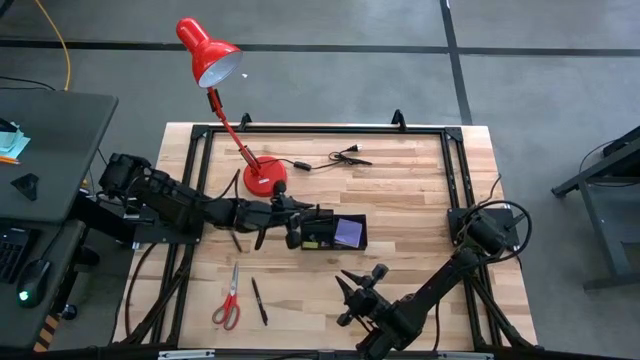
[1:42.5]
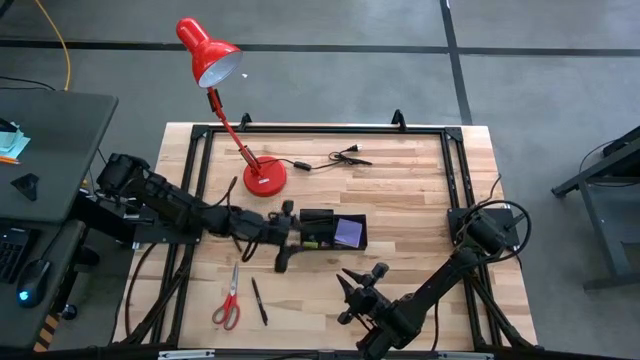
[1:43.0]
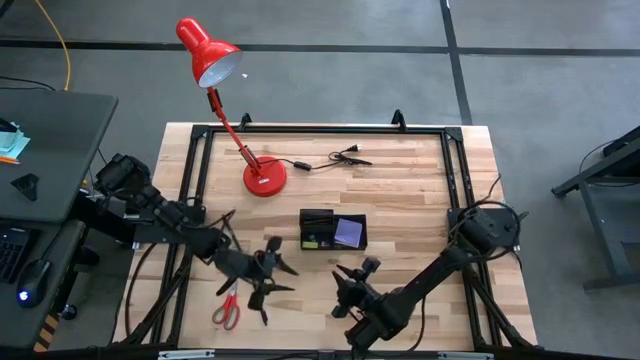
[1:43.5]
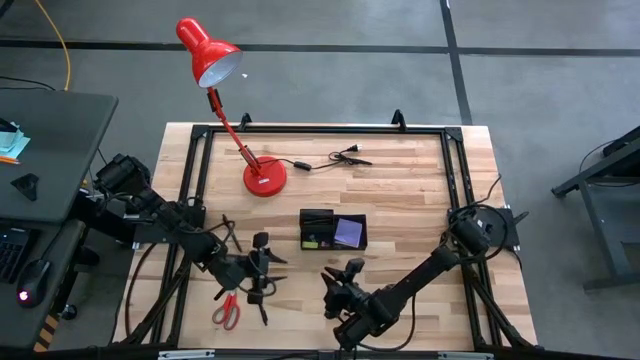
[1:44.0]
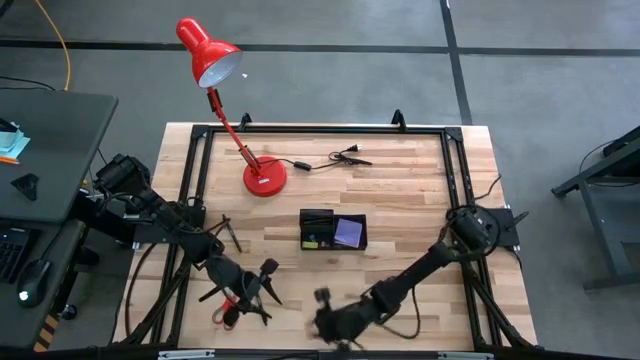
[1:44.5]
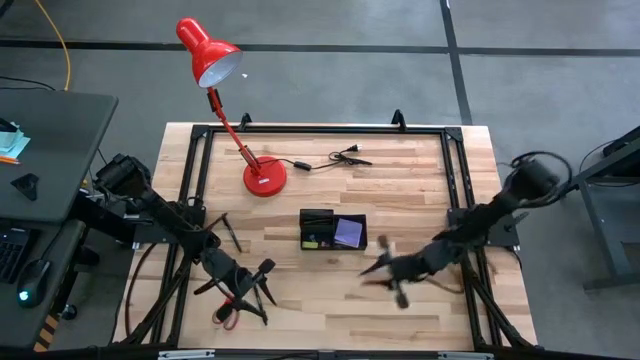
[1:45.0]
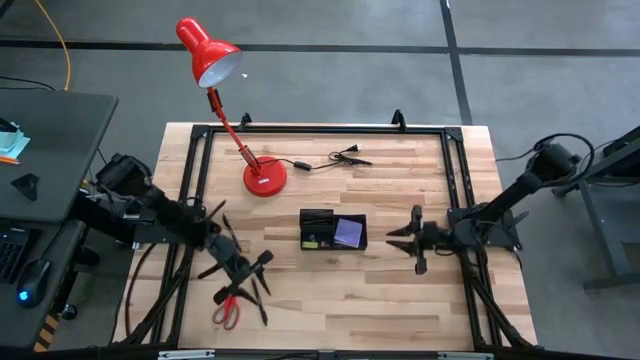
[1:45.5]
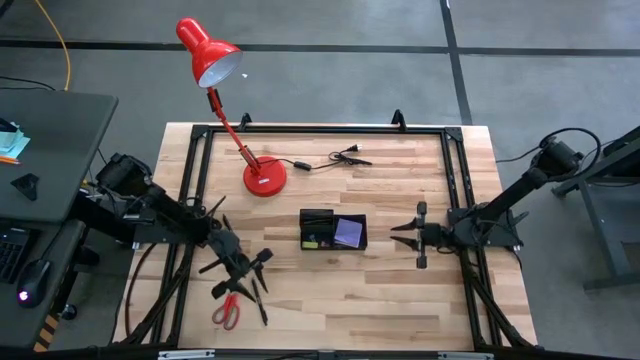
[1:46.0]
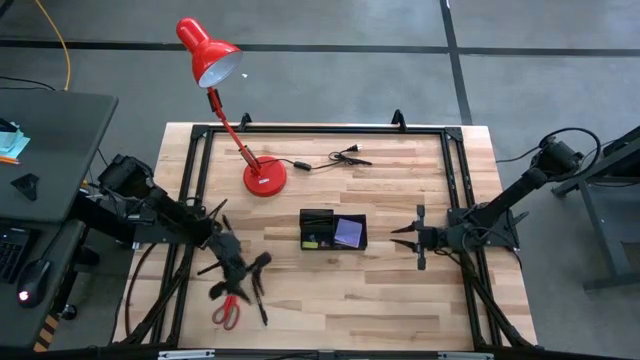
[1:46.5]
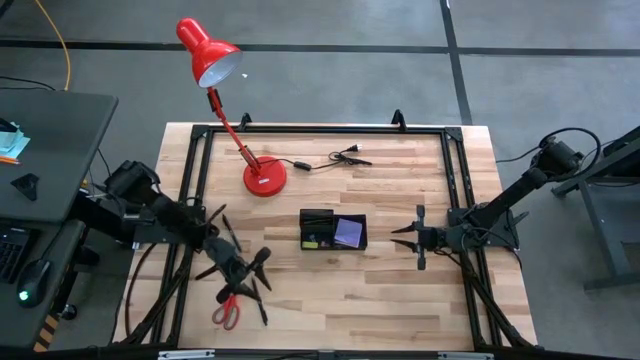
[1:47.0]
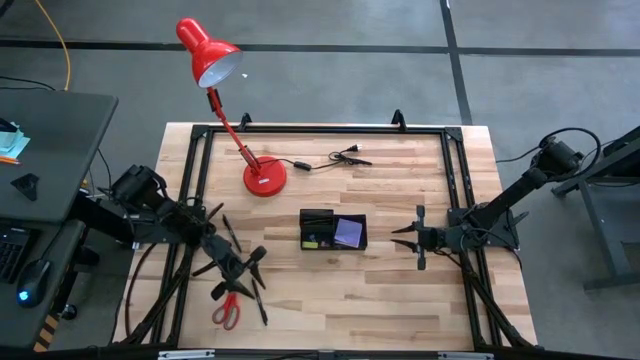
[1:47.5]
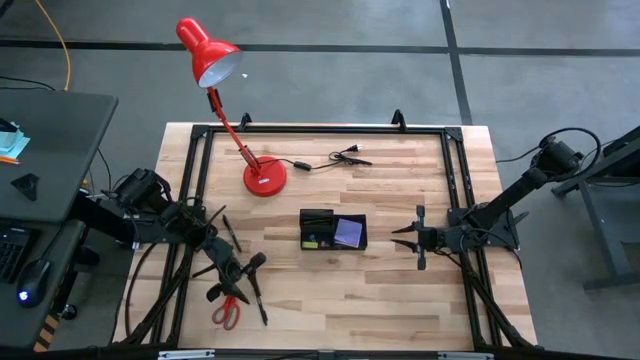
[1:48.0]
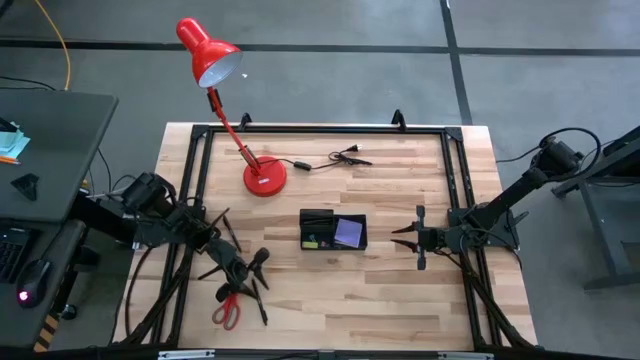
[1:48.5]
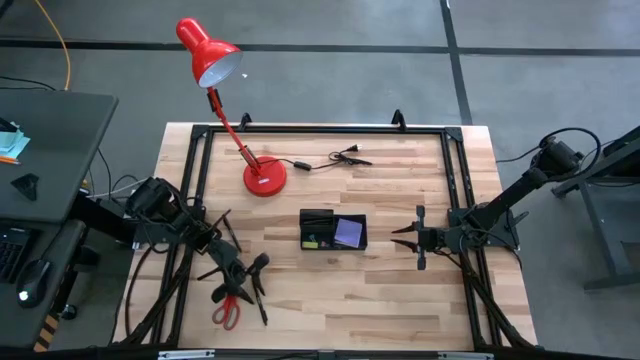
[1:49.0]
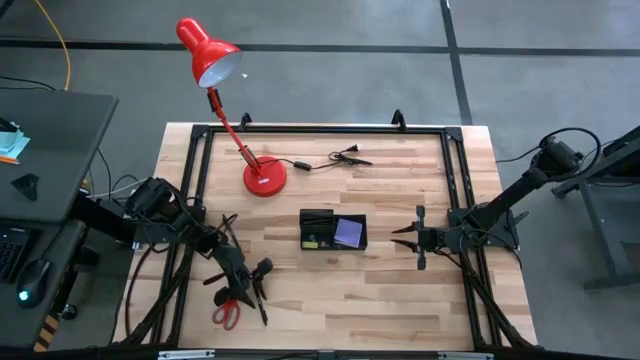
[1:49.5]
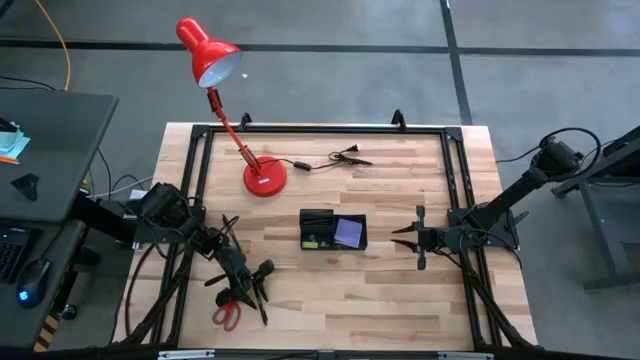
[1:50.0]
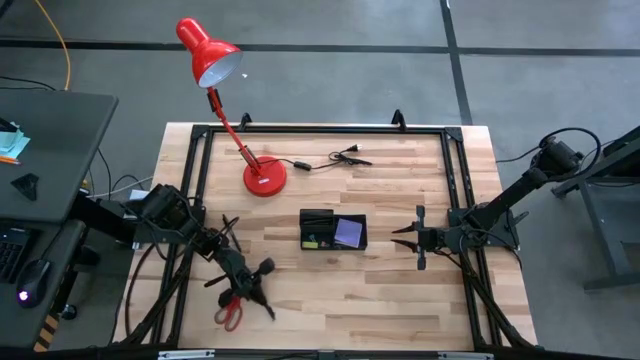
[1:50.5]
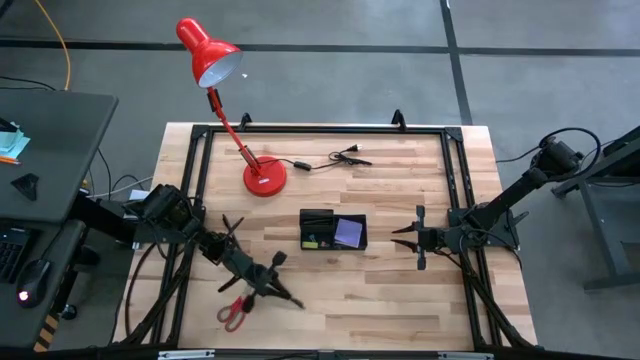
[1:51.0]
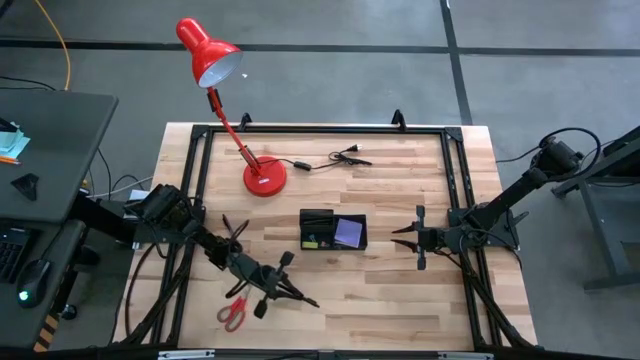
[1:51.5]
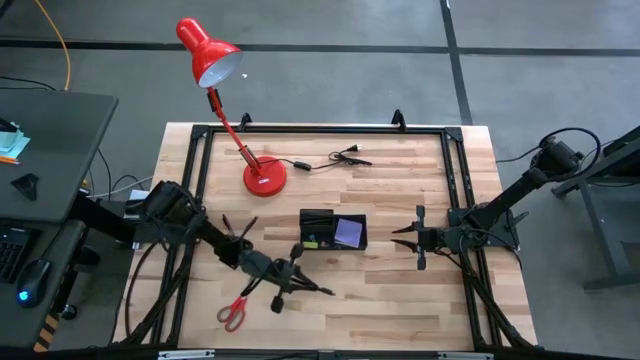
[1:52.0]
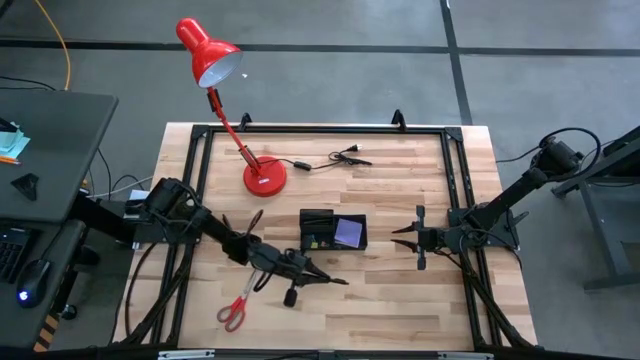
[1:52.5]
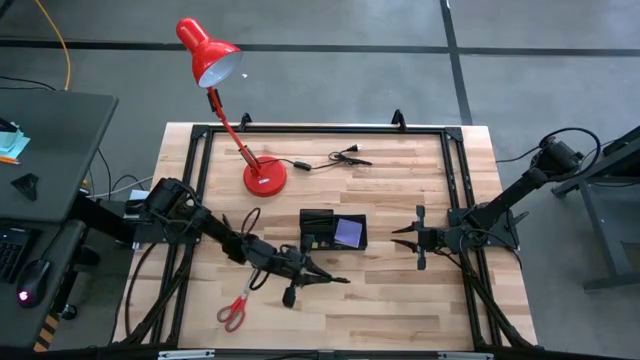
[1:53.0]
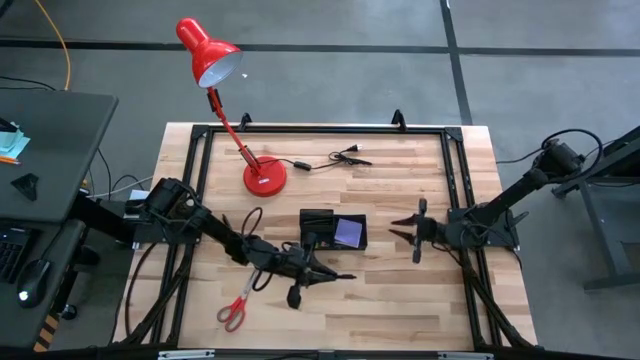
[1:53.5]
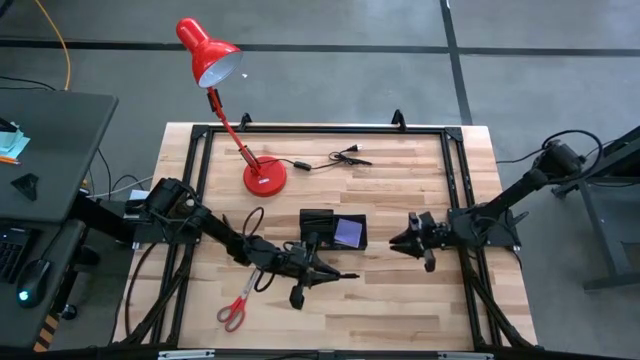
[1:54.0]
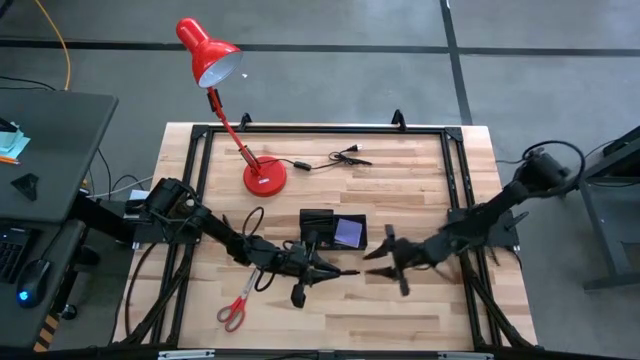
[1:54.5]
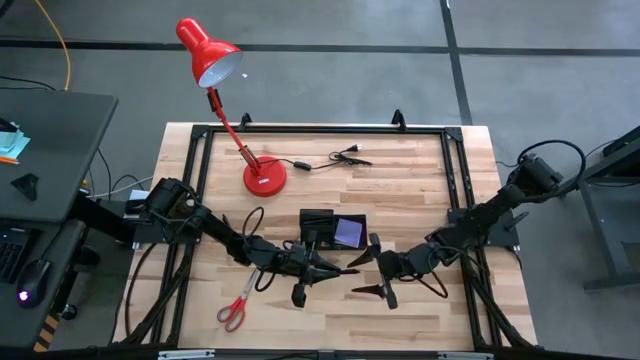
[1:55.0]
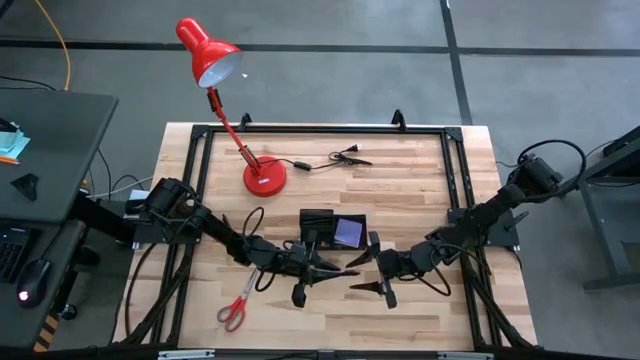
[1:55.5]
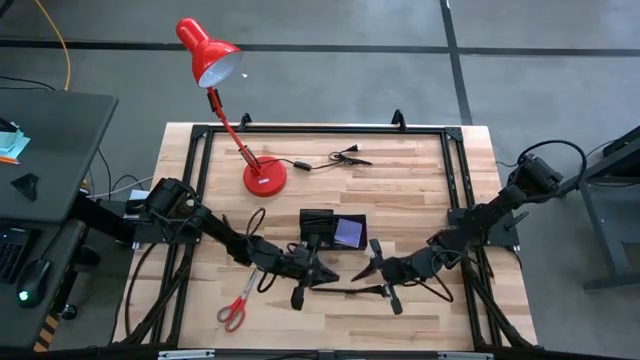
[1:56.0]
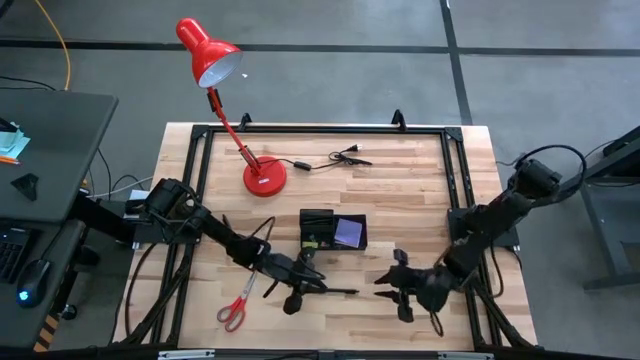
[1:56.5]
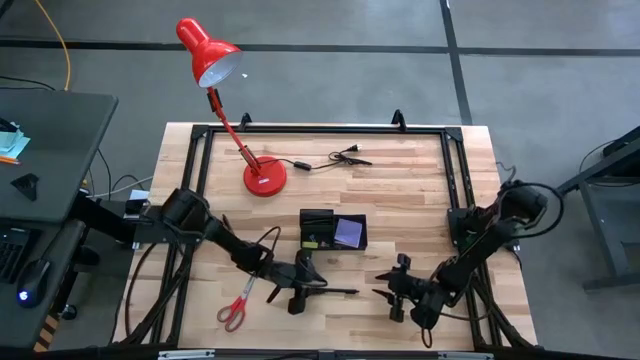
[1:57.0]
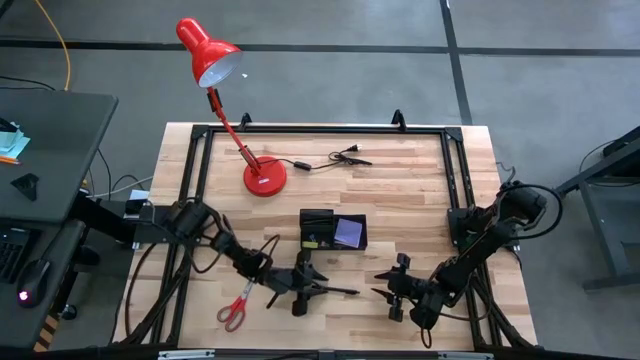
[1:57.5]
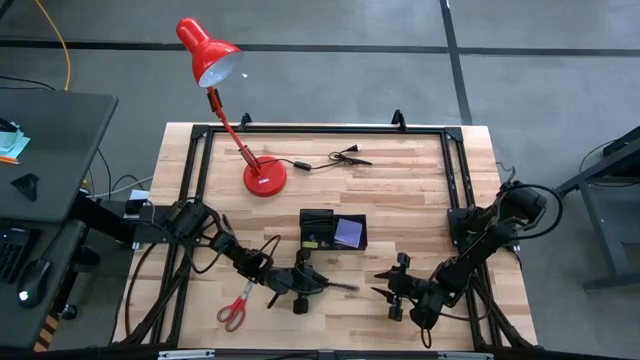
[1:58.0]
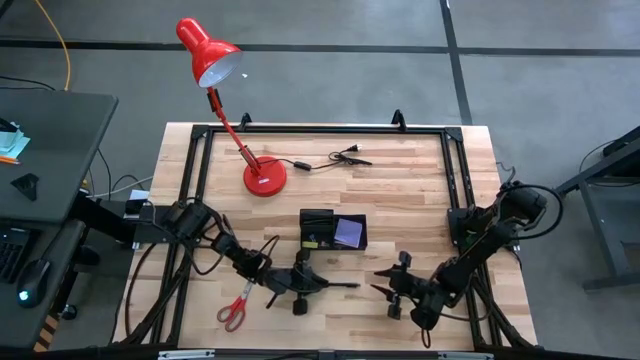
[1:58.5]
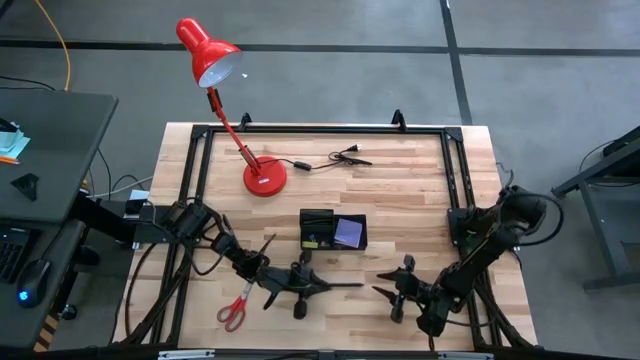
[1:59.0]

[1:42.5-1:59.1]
Task: Pick and place office supplies into organizer
Put the bottom black pen into the black desk organizer

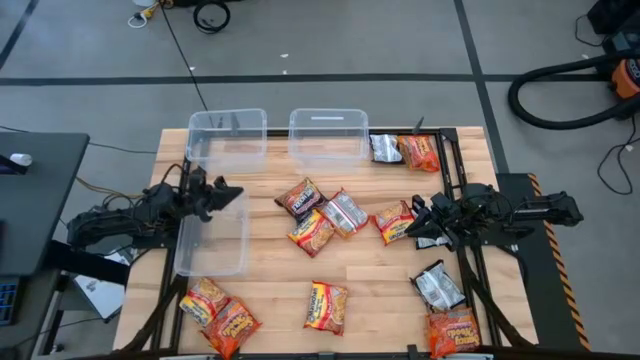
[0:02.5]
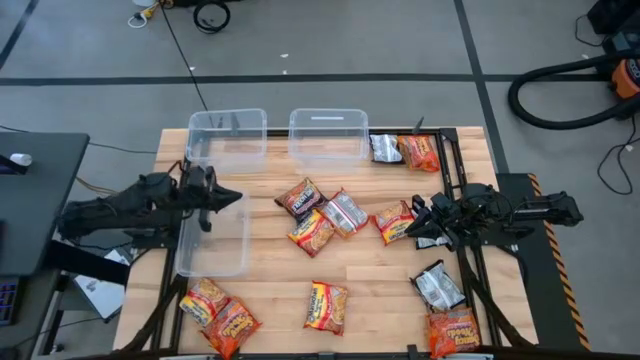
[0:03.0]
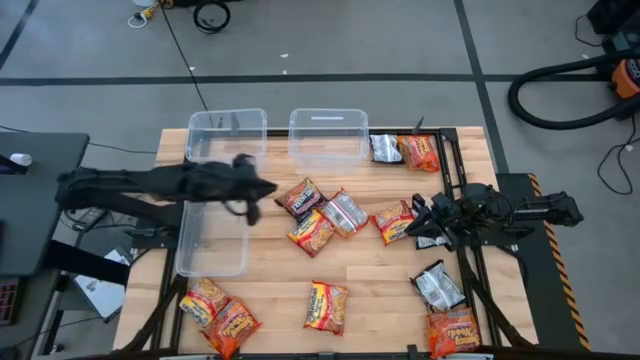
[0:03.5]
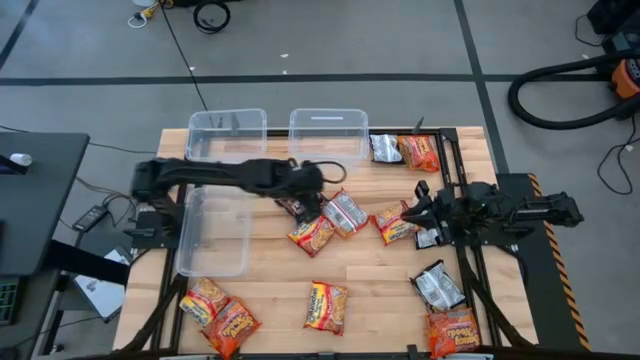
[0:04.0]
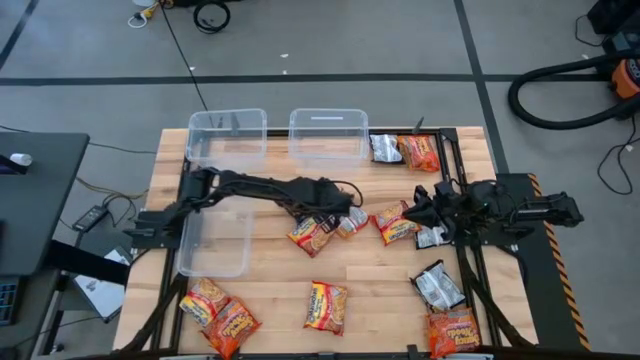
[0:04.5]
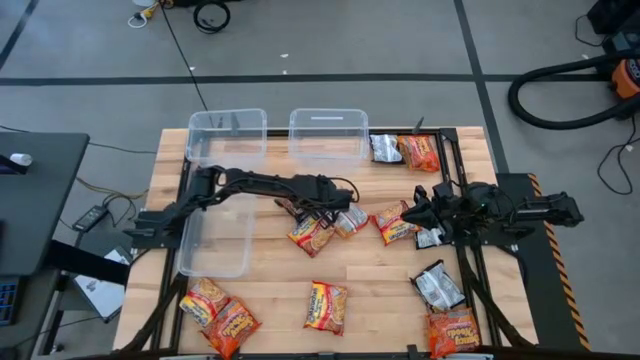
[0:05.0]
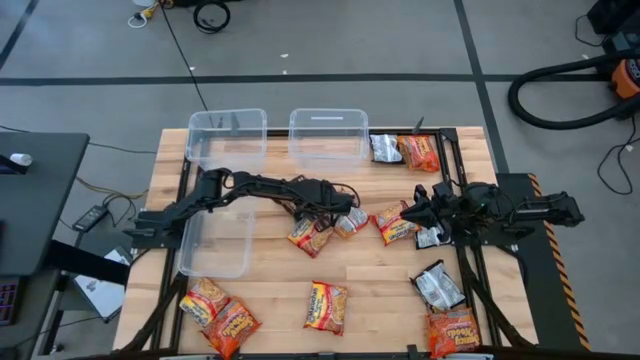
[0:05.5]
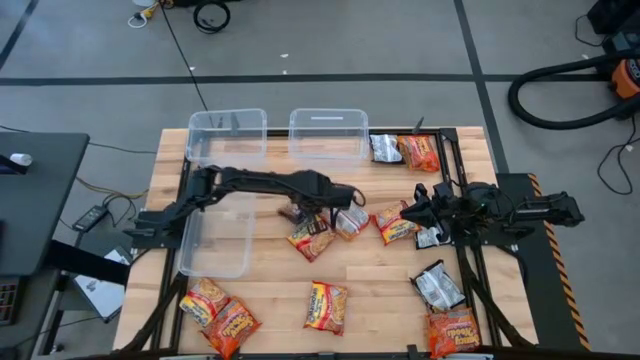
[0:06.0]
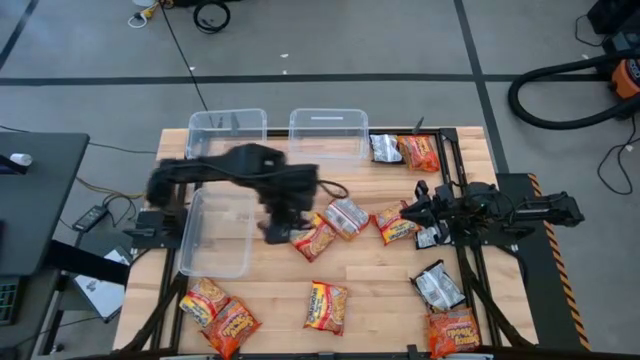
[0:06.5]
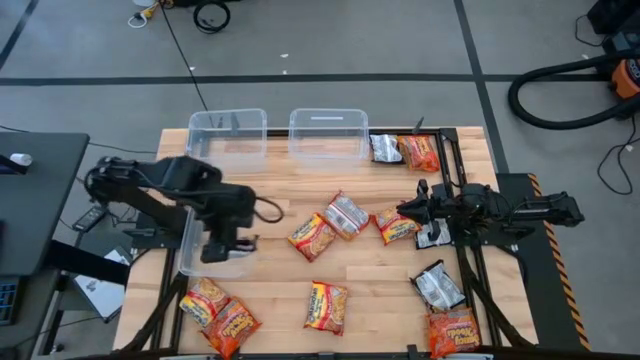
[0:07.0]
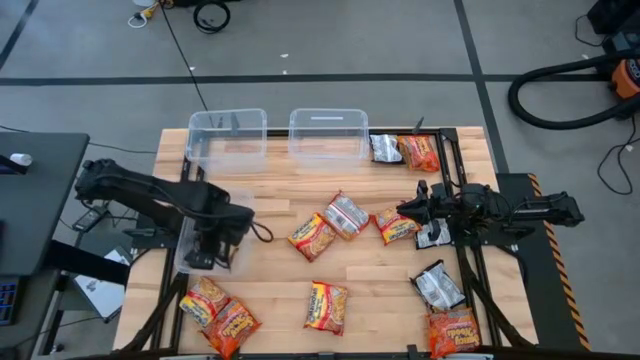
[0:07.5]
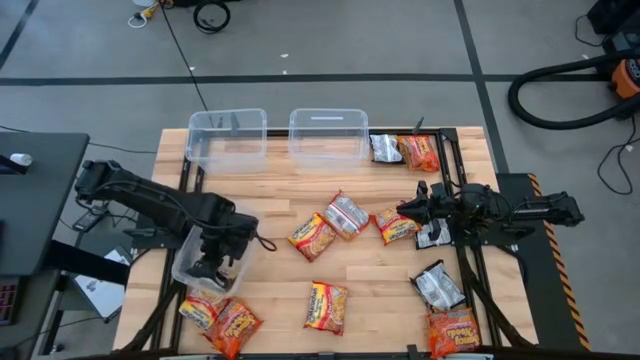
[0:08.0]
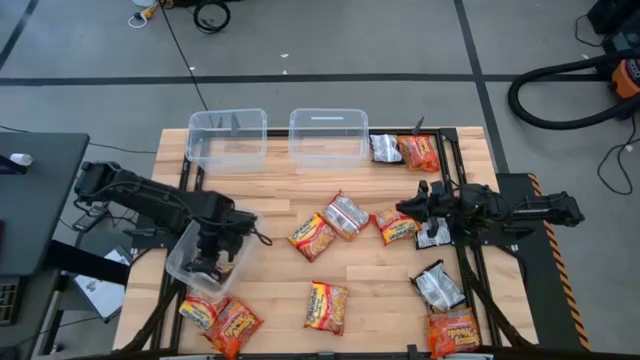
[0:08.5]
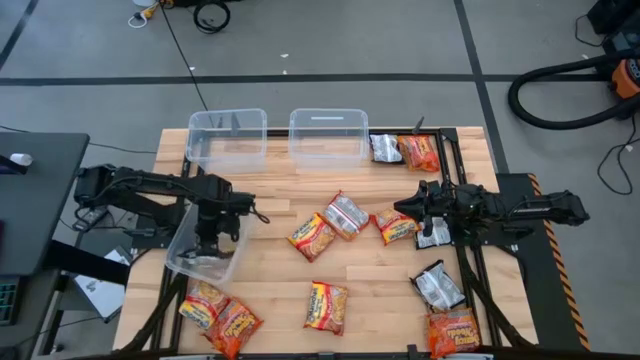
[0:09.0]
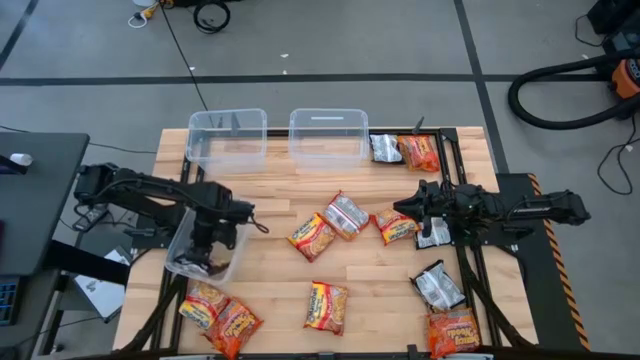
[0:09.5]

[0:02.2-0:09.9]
Task: Sort Maruchan noodles
Put the middle left black noodle pack into the bottom transparent bin
